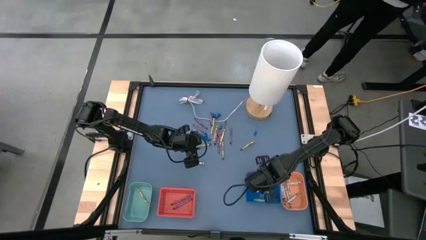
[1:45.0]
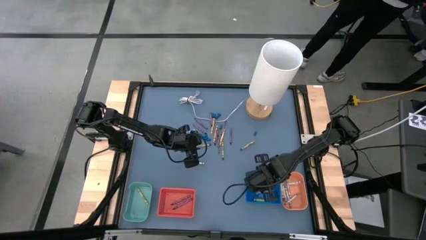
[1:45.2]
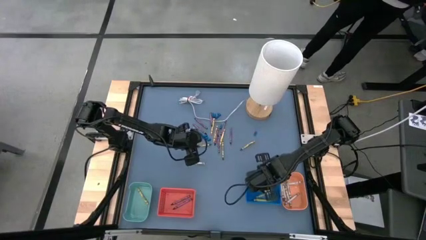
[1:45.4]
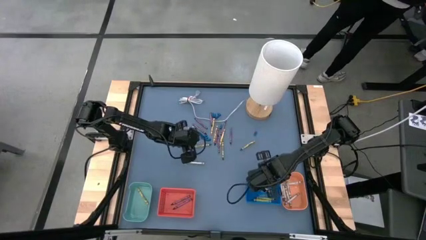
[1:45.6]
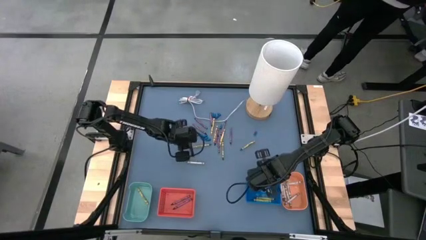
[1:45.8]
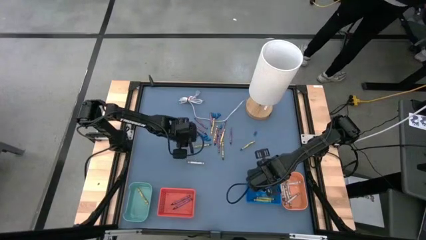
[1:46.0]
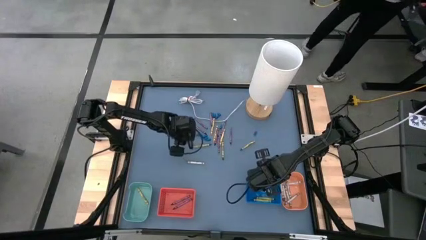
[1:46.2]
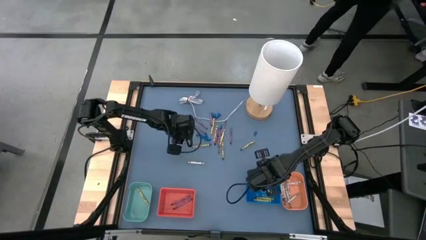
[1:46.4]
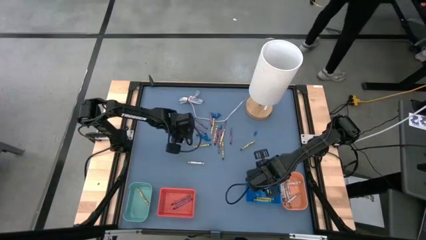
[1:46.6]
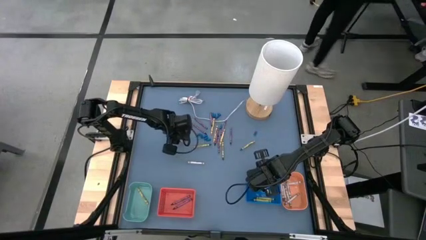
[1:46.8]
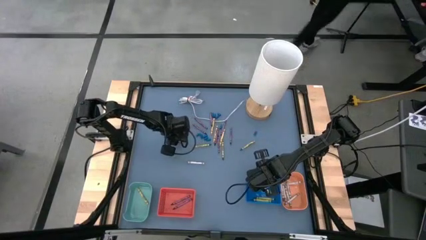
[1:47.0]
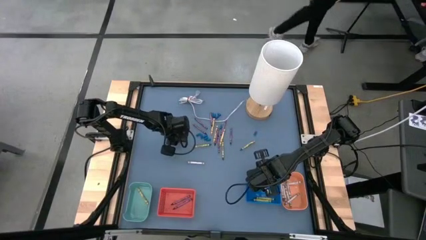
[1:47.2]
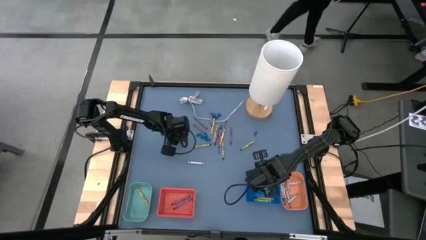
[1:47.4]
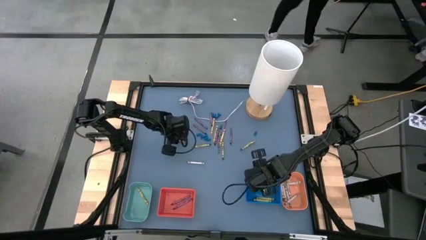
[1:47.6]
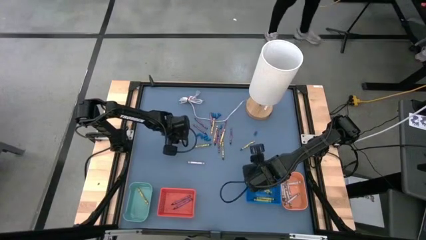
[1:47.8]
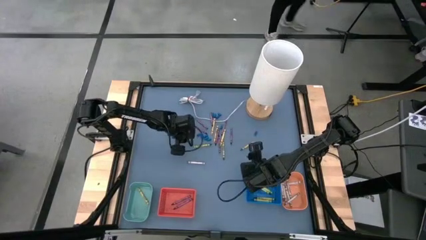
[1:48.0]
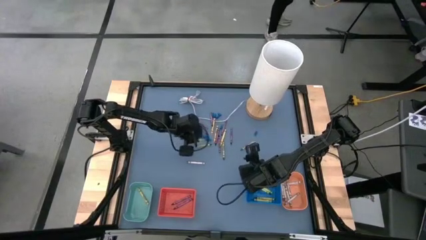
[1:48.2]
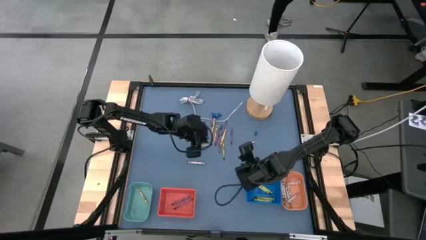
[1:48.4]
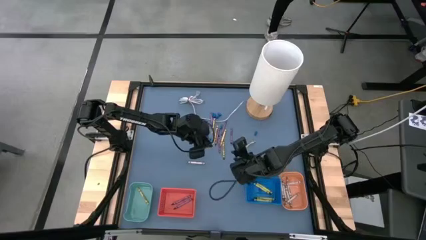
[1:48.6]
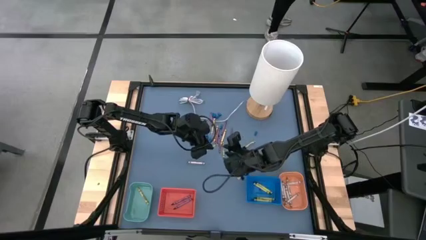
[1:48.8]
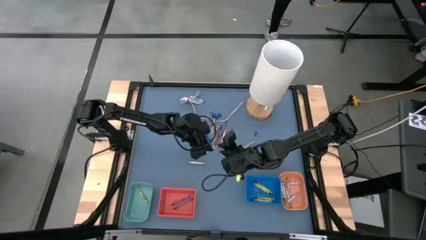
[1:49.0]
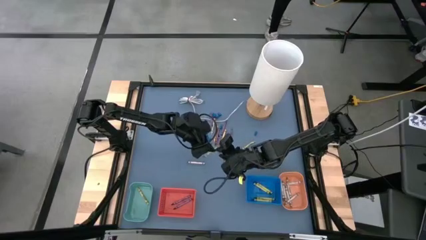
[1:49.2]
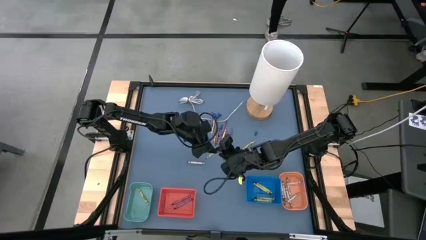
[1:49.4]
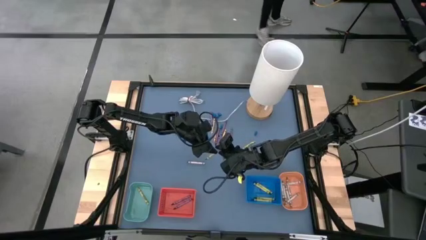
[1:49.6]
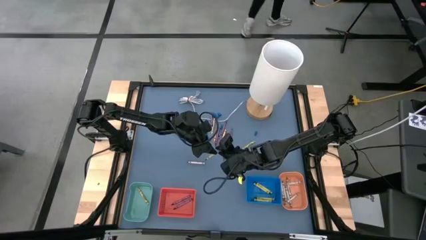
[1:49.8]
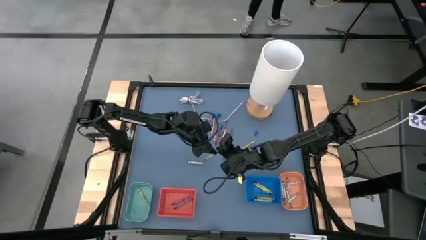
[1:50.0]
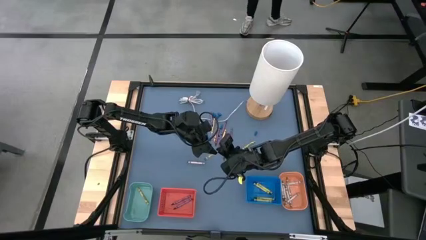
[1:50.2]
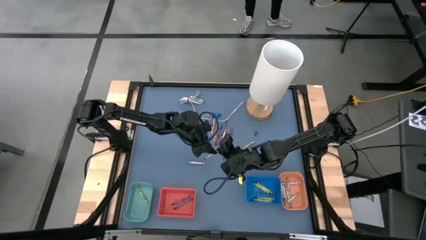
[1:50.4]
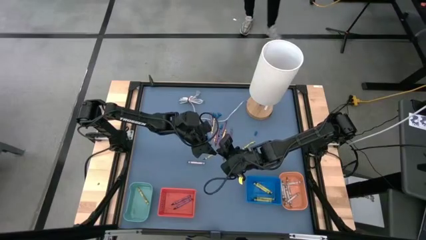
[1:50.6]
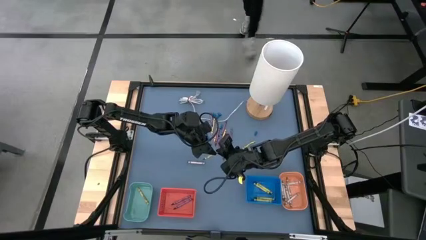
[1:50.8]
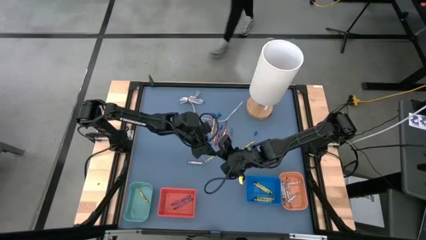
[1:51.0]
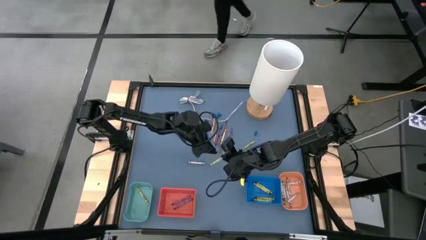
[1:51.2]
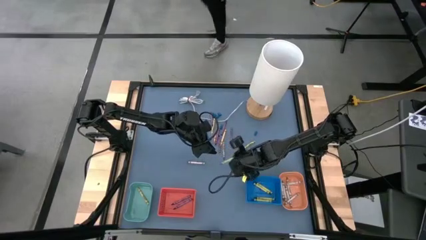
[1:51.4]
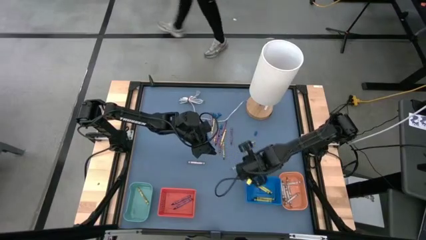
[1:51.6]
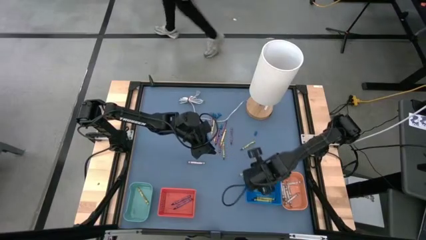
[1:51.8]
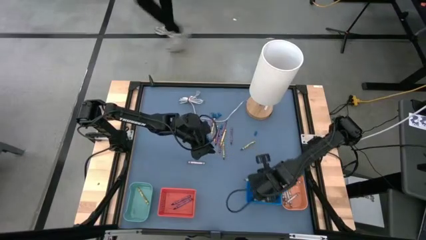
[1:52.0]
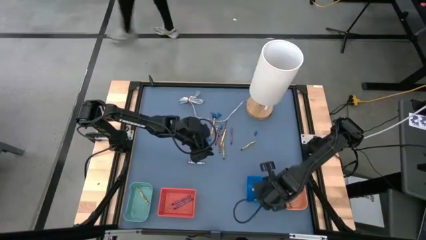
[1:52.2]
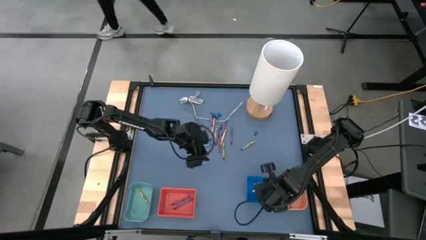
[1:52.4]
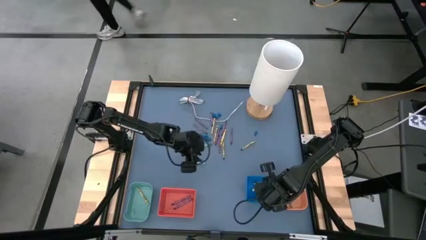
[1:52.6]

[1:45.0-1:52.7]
Task: Sort crayons
Put the green crayon into the blue basket

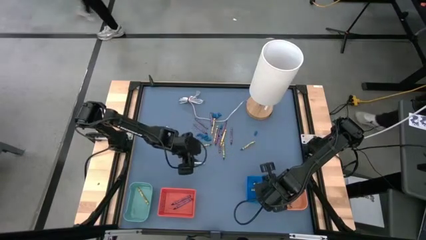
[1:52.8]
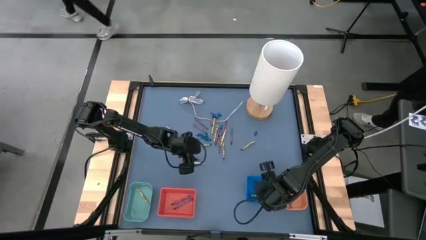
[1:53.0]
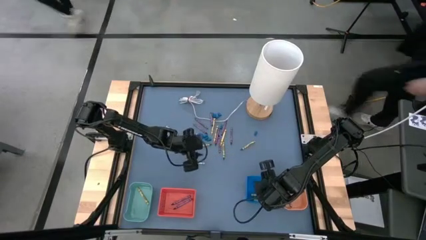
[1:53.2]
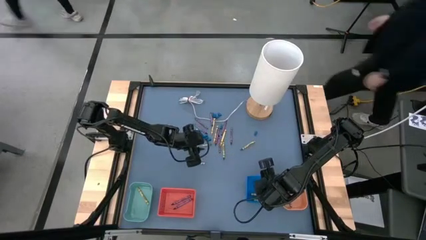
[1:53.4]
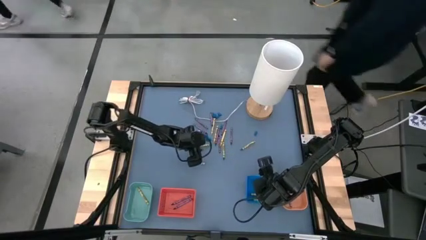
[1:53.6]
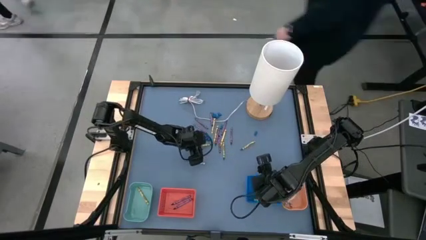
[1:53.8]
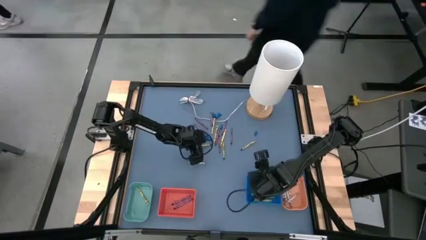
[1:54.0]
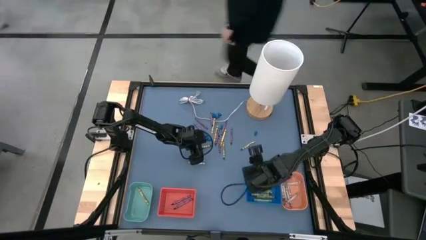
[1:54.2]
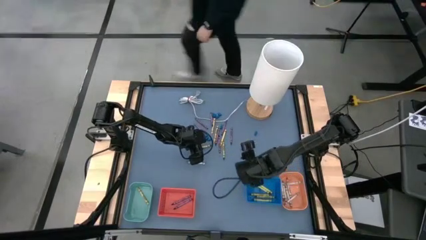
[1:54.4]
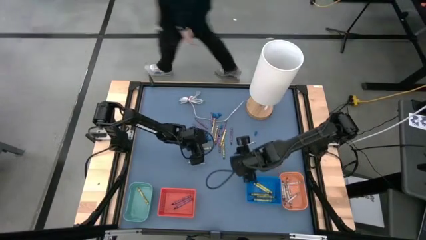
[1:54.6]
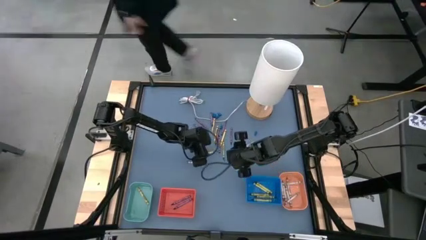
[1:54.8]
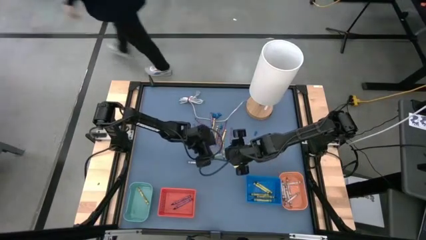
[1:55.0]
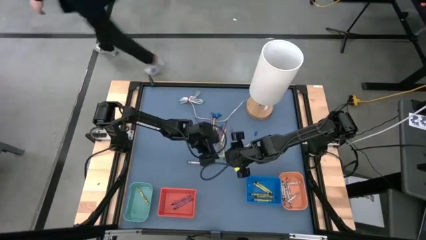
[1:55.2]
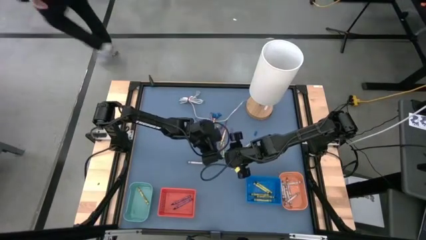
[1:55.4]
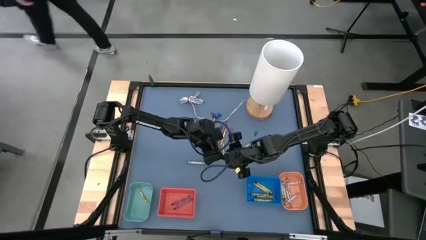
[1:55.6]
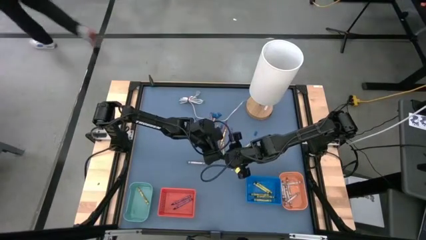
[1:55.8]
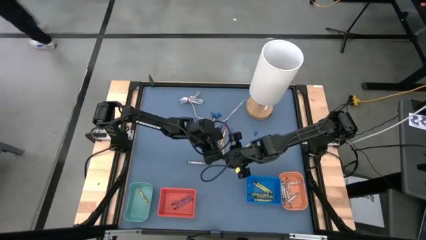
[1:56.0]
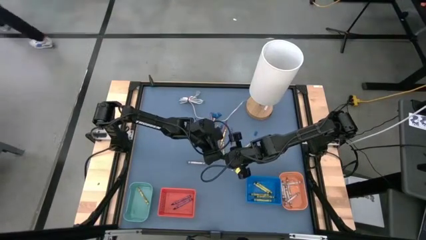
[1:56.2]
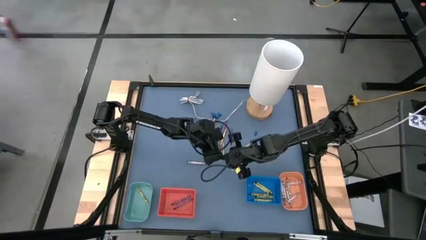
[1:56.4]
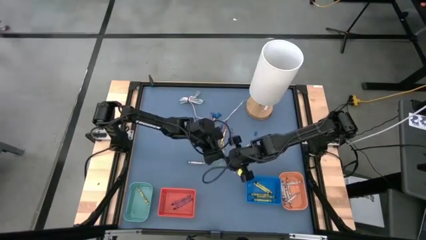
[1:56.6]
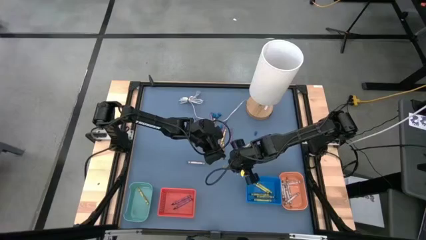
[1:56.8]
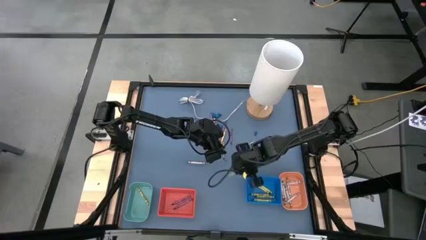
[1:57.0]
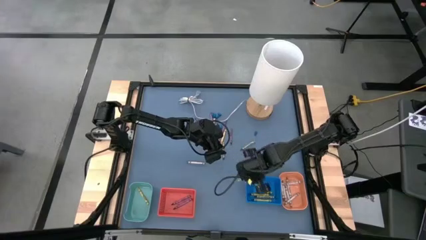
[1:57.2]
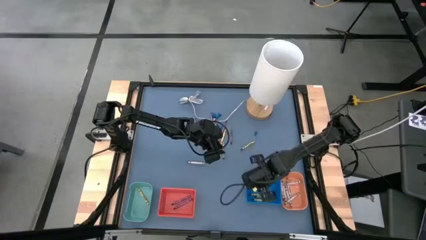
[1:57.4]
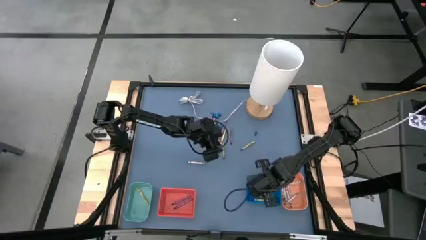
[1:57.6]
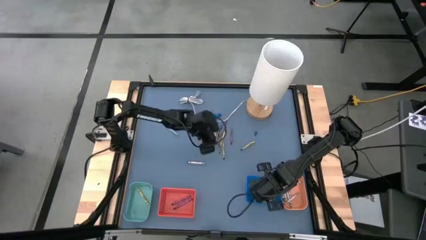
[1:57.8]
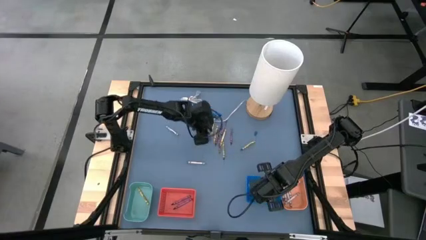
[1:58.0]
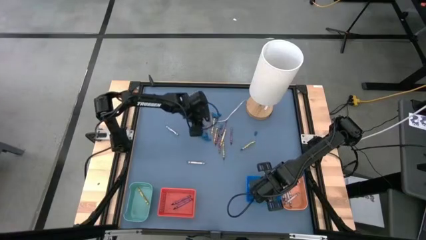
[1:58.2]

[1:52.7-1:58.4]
Put the green crayon into the blue basket

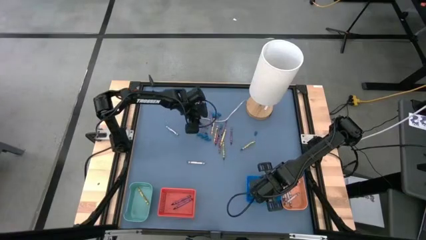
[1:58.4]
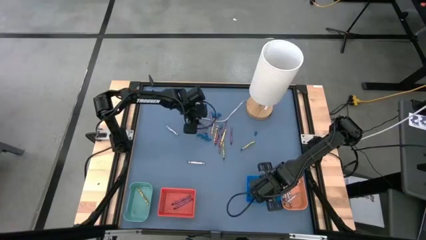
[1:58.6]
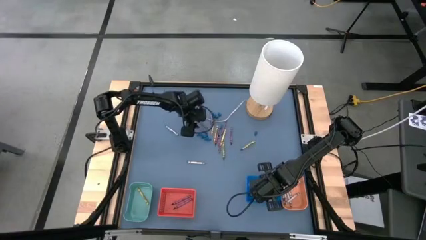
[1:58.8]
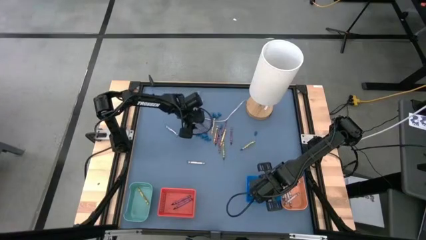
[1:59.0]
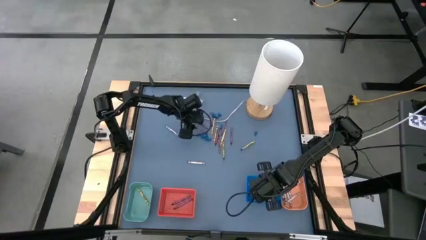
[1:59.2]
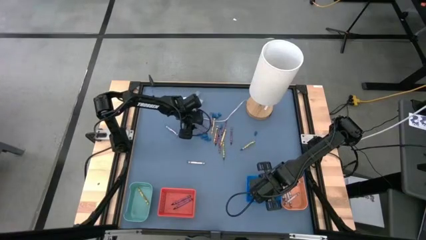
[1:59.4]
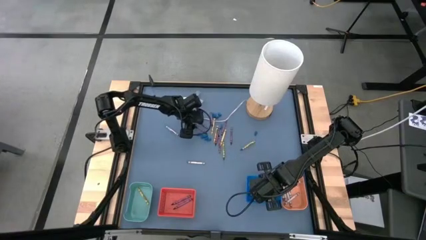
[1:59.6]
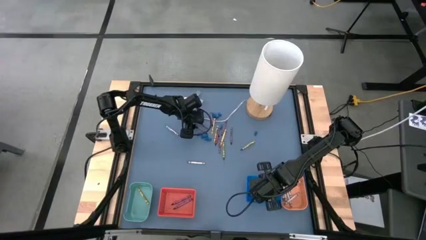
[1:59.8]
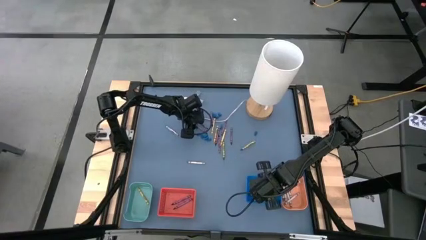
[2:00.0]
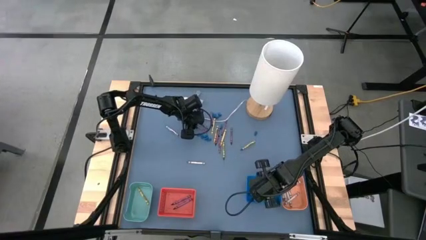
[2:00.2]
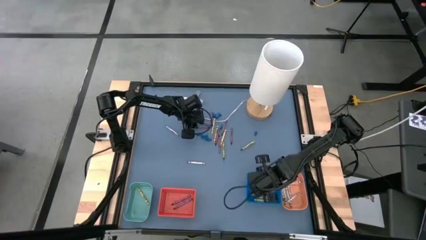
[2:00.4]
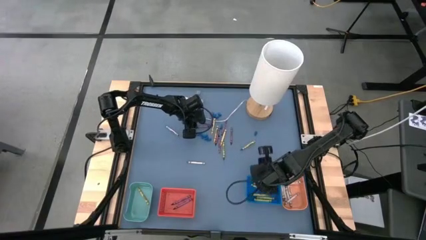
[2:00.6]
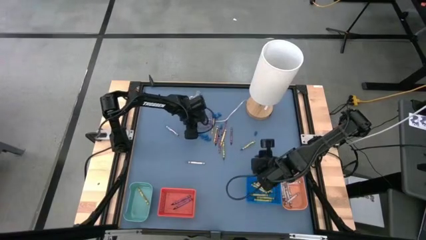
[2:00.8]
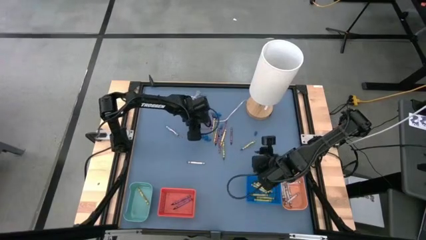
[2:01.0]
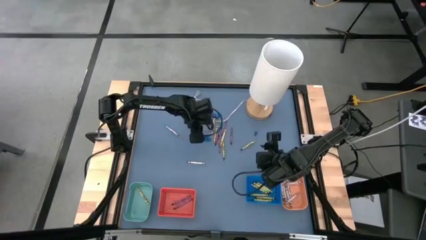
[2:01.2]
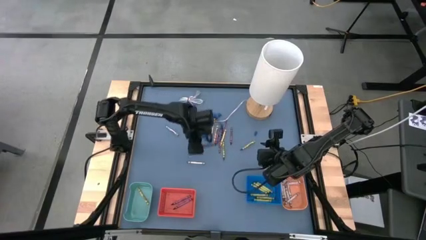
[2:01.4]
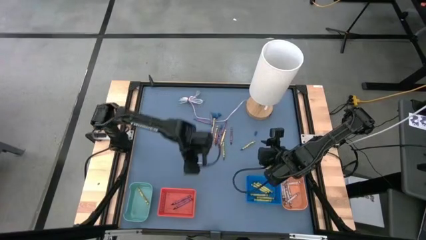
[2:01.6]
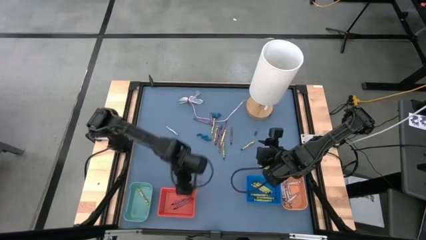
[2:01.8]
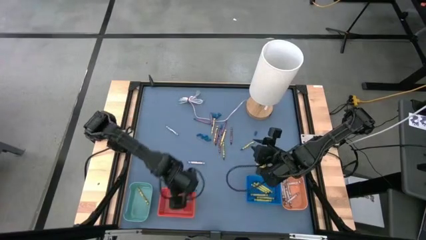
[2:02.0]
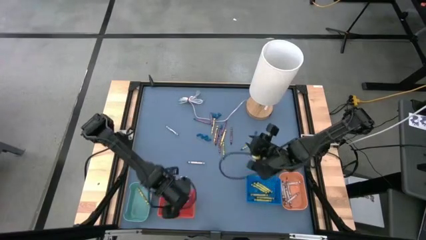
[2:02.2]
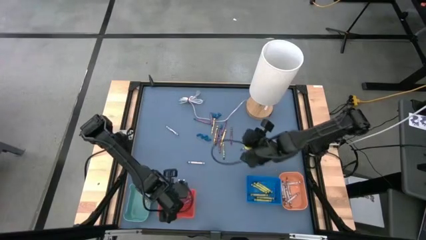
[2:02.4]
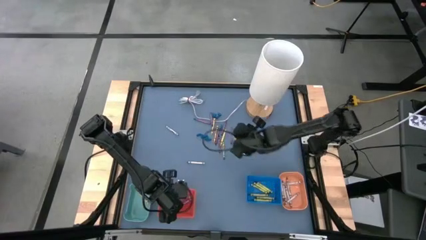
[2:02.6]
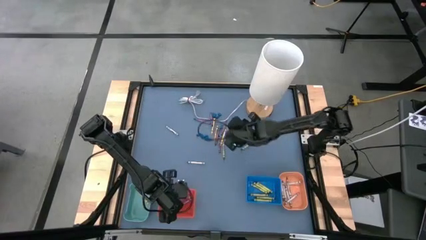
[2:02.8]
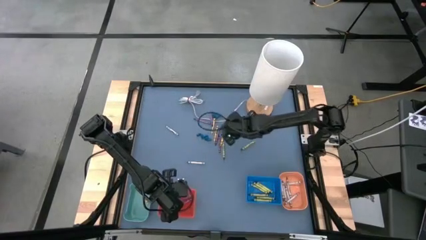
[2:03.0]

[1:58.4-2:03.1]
Put the red crayon into the red basket
